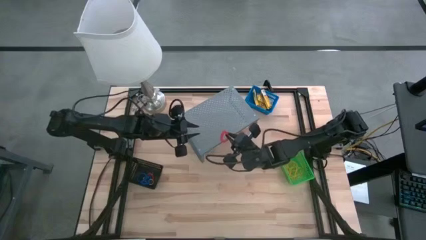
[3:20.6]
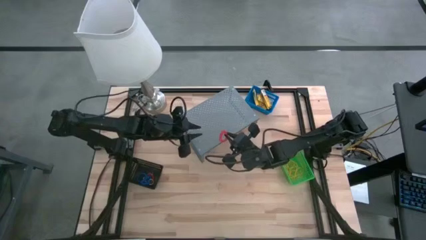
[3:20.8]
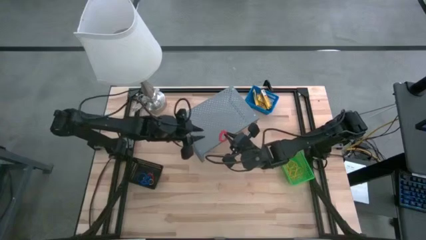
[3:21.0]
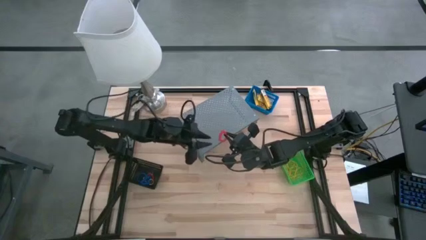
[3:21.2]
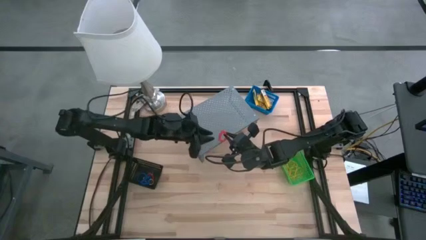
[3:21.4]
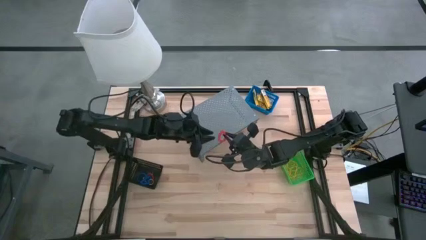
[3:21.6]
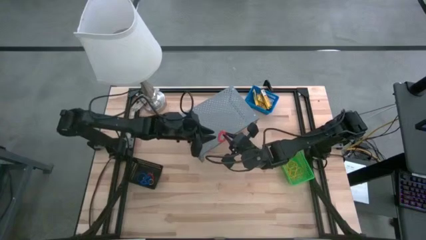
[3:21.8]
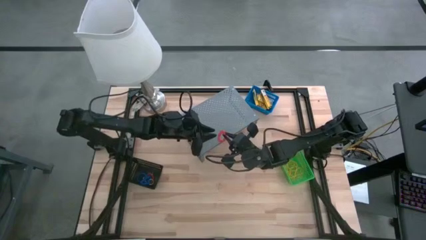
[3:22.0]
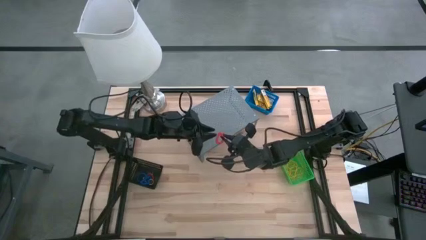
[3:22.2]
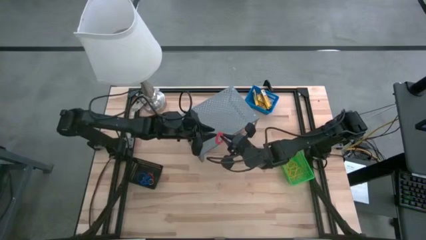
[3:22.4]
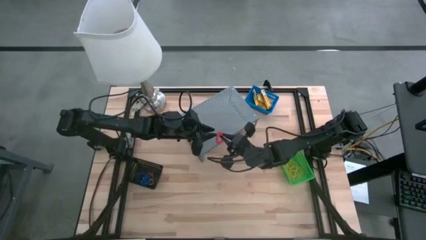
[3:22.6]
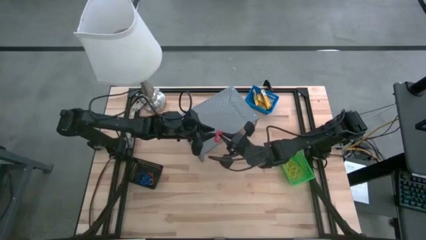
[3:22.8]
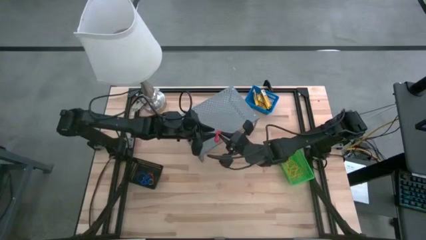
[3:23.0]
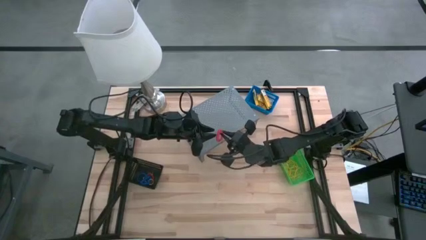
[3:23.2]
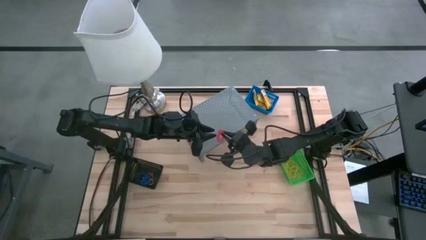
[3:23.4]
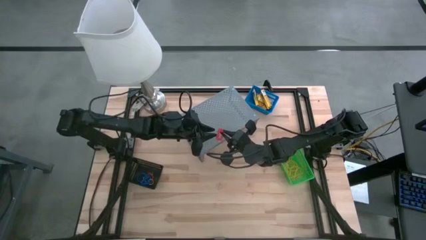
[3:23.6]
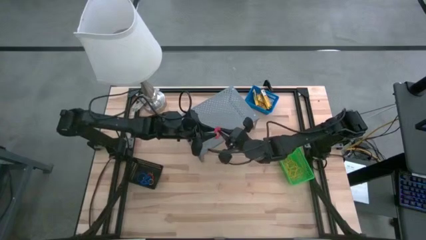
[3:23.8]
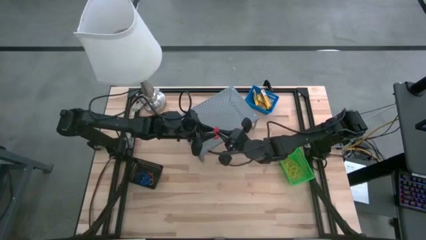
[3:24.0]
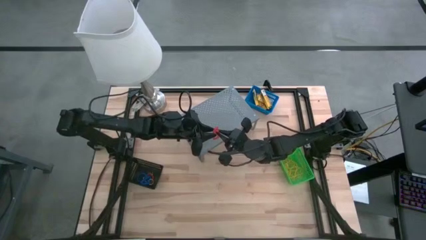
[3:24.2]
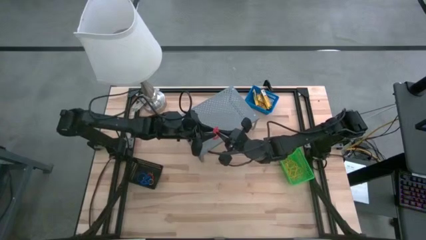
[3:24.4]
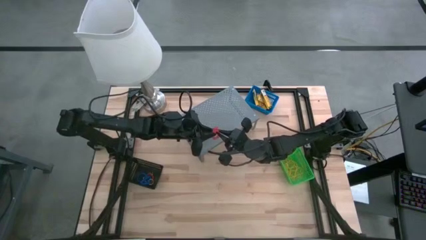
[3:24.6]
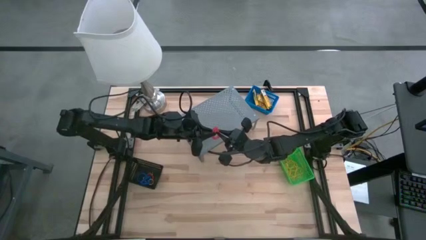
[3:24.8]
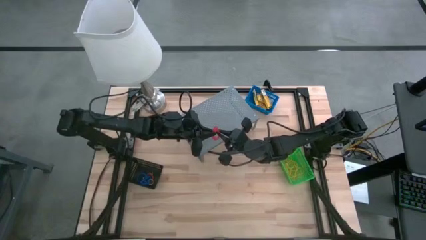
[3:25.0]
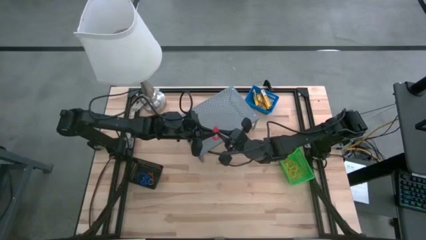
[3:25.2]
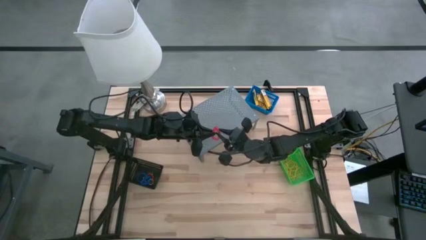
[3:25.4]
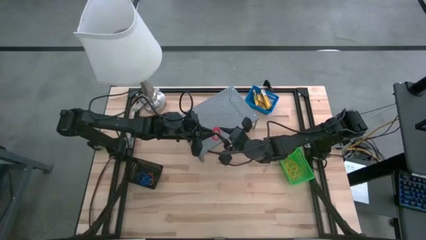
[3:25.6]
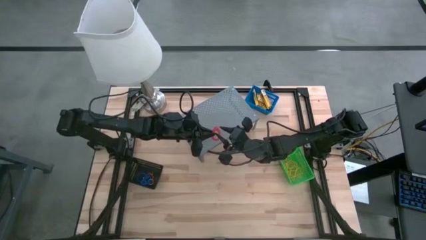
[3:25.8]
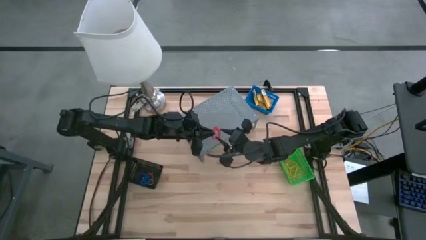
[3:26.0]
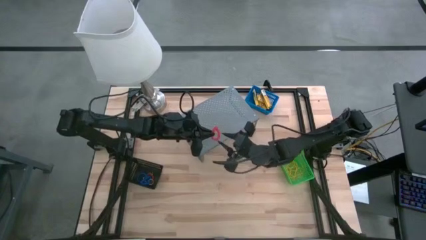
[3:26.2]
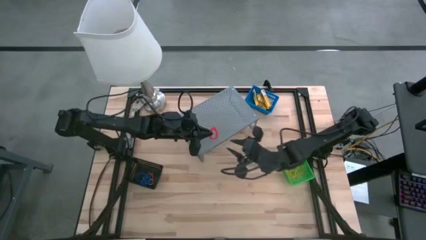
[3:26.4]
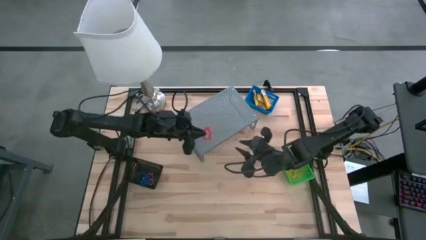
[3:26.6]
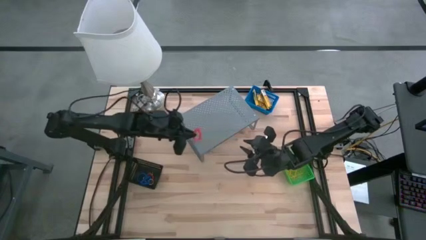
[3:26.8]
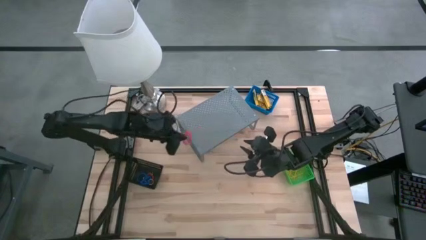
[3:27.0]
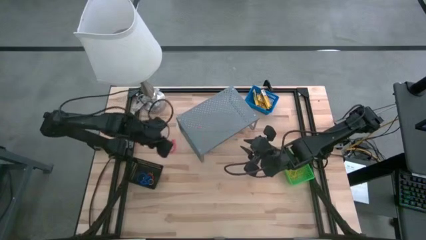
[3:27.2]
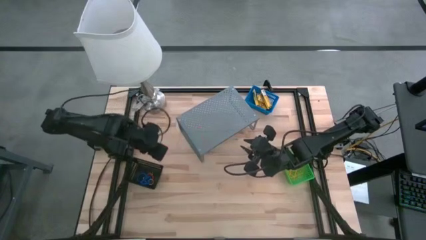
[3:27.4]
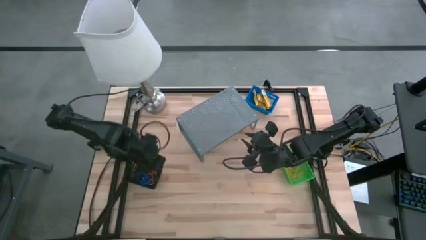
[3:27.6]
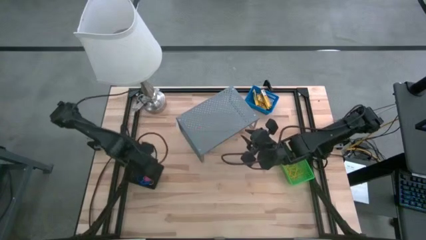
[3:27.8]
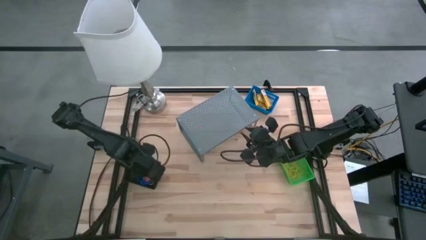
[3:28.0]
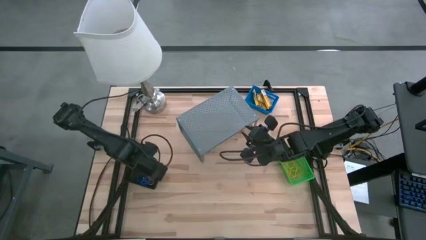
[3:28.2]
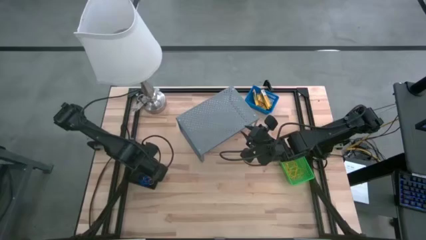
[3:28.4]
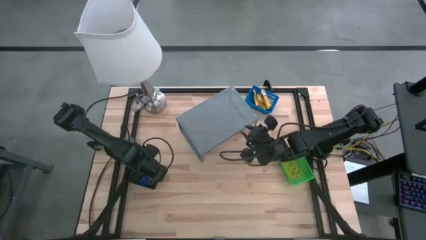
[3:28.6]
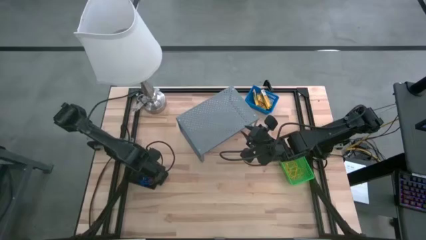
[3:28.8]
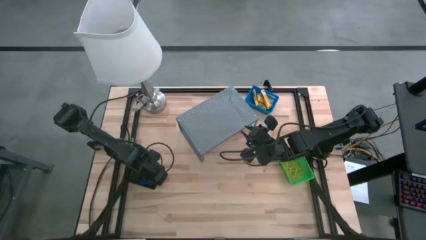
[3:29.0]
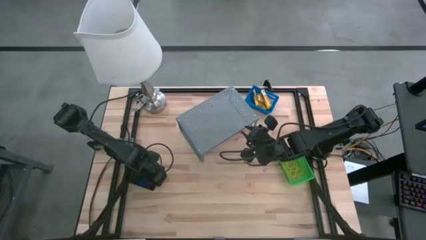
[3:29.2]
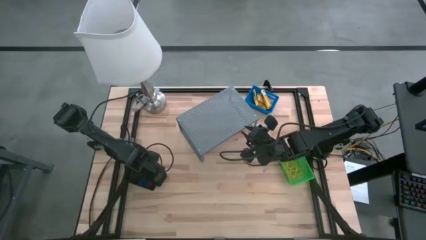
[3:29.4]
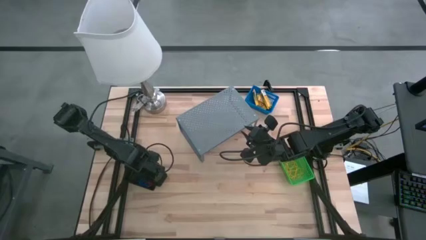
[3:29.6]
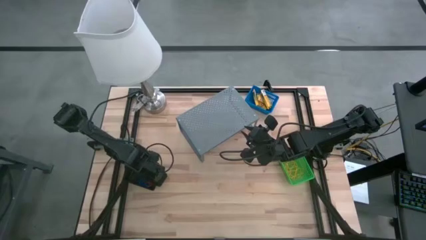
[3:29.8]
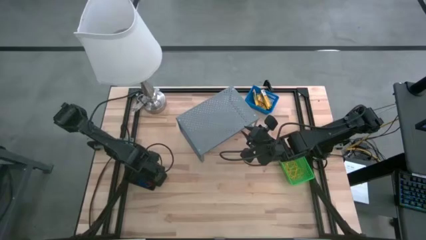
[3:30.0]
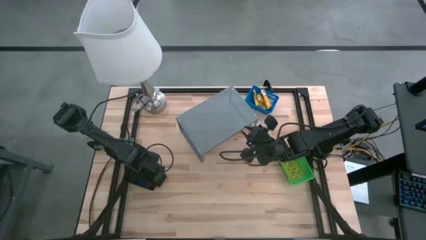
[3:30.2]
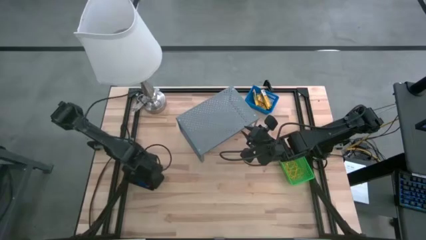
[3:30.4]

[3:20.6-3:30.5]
Task: Pick & Place Office Desk Supplies
Put the orange spring keychain into the black basket
